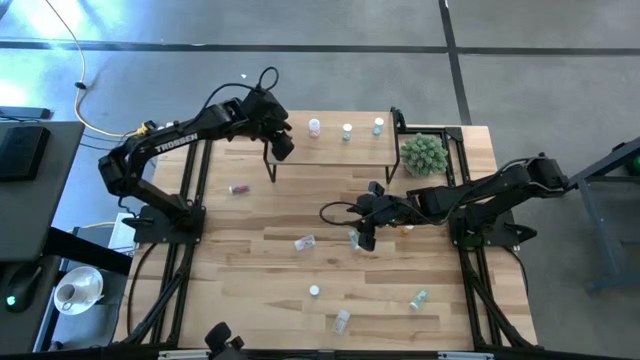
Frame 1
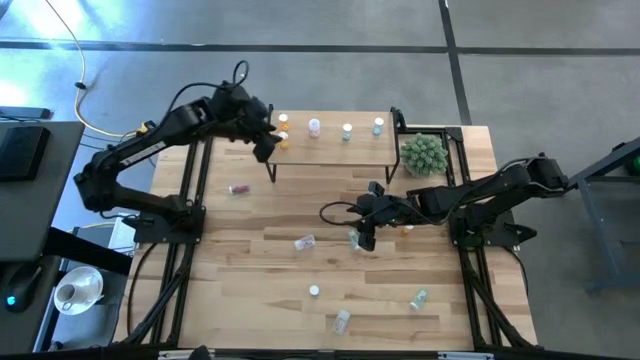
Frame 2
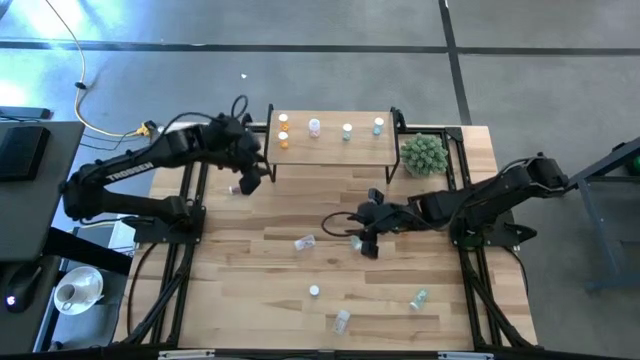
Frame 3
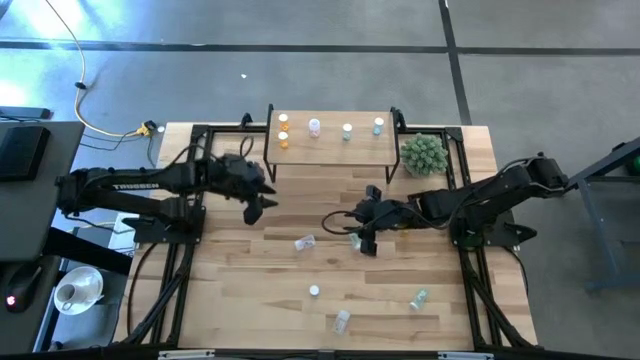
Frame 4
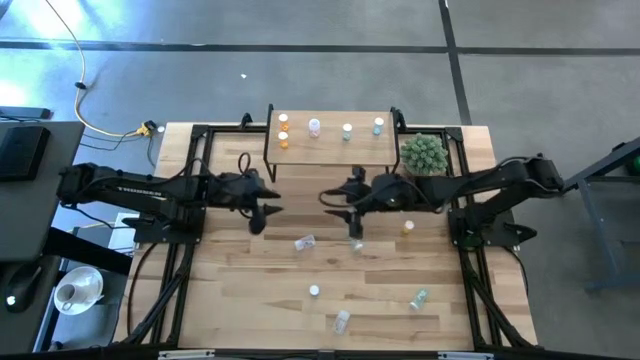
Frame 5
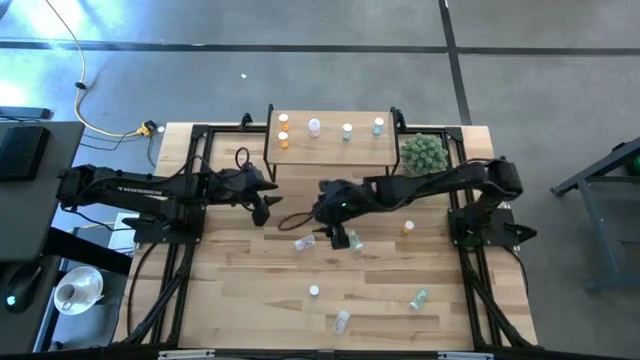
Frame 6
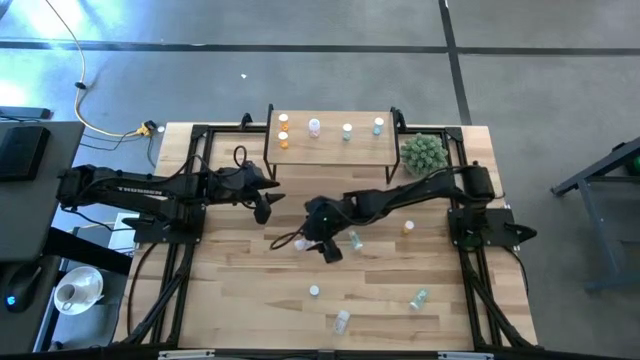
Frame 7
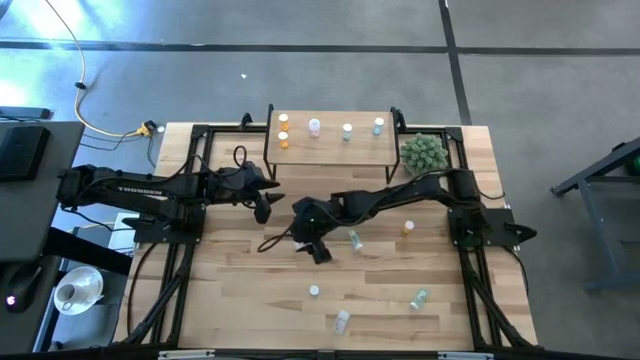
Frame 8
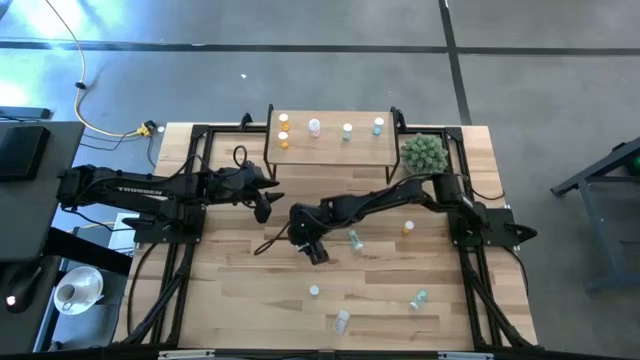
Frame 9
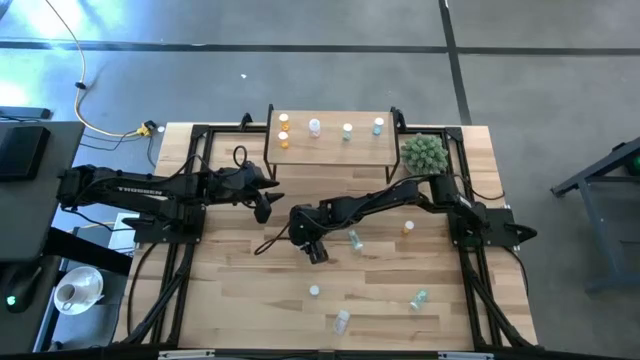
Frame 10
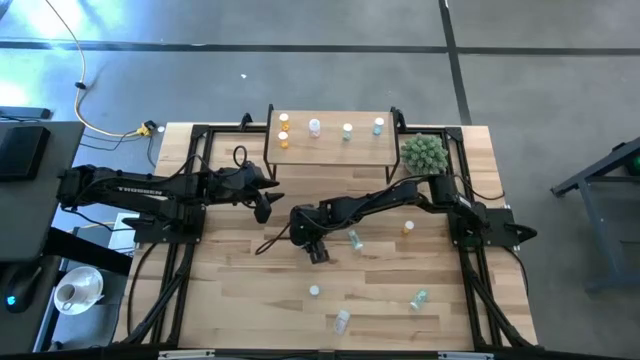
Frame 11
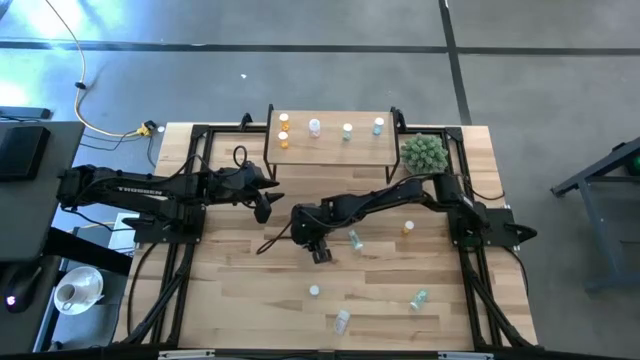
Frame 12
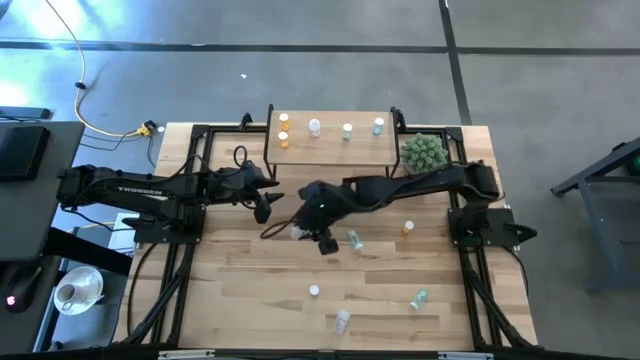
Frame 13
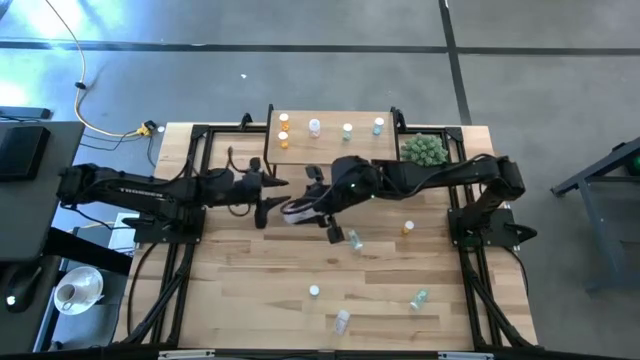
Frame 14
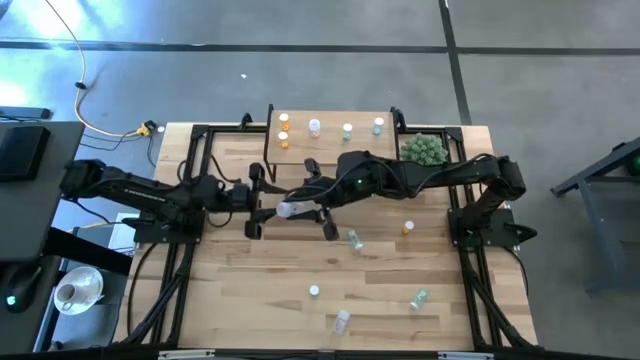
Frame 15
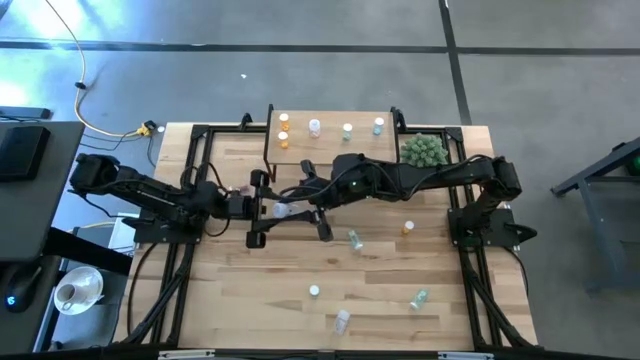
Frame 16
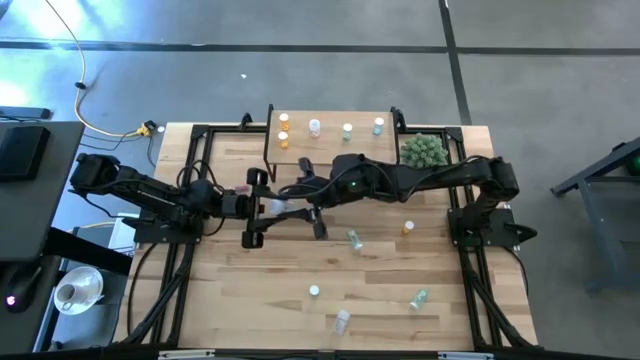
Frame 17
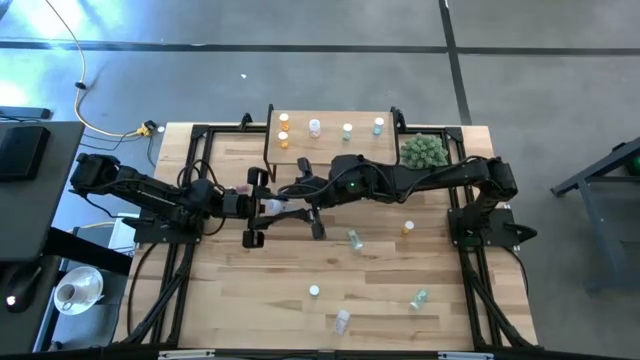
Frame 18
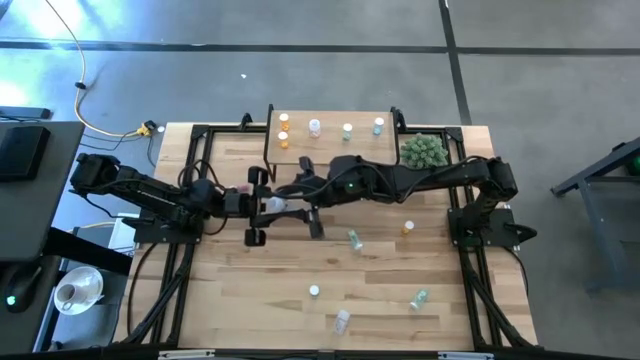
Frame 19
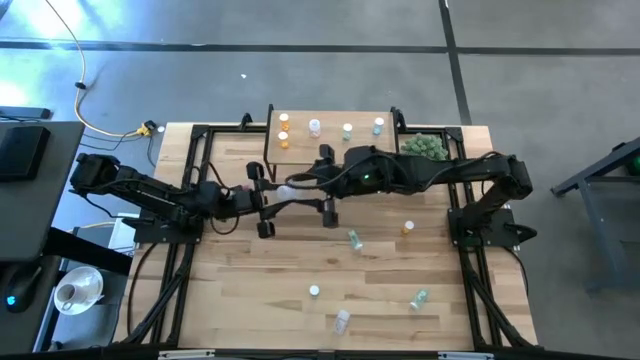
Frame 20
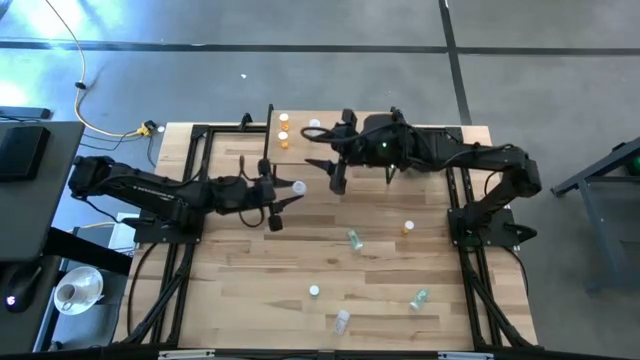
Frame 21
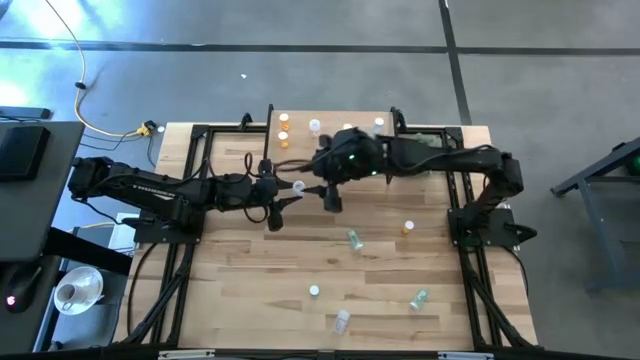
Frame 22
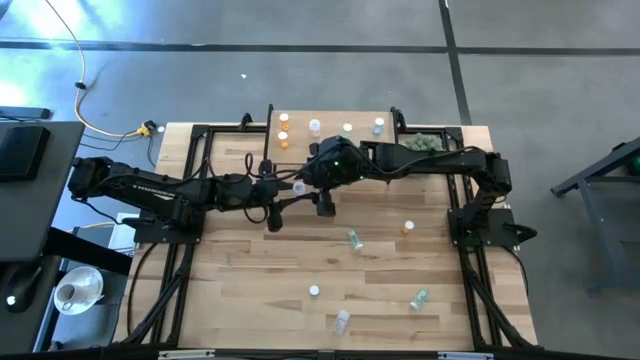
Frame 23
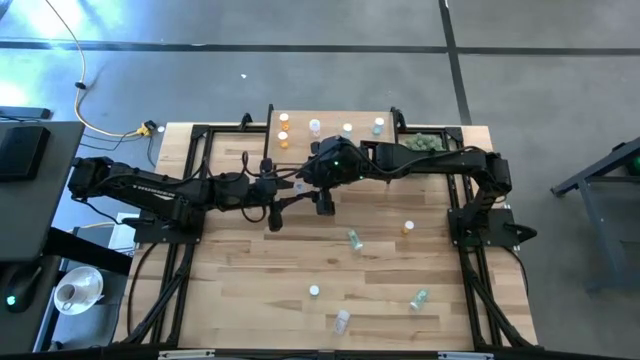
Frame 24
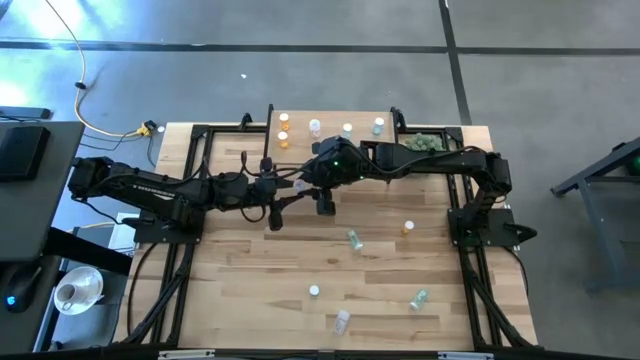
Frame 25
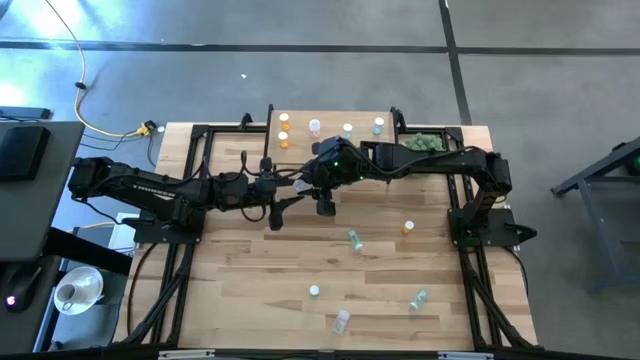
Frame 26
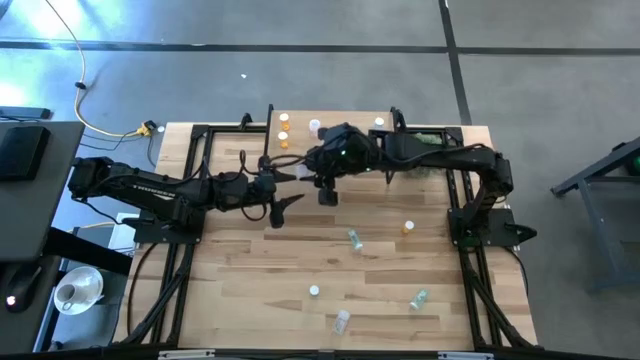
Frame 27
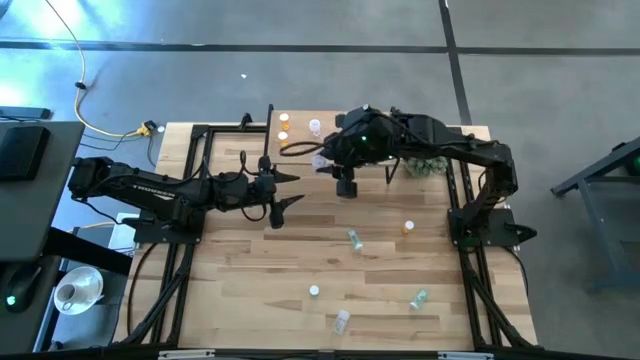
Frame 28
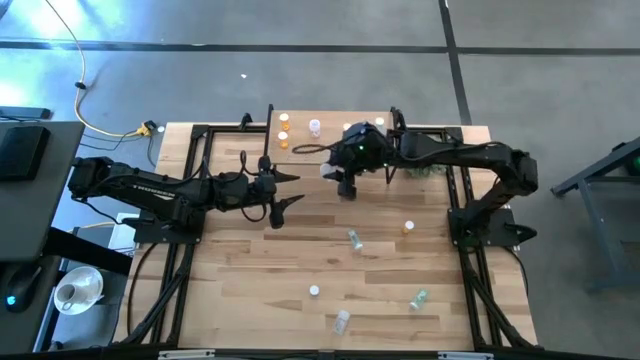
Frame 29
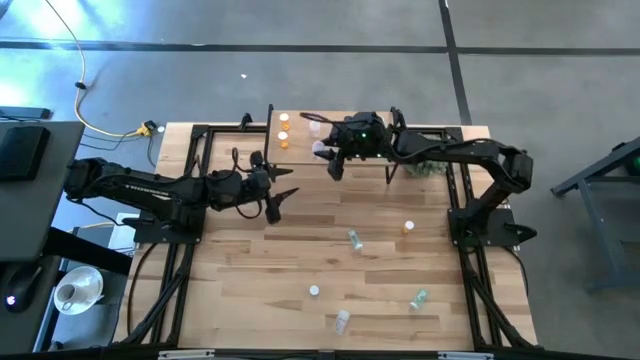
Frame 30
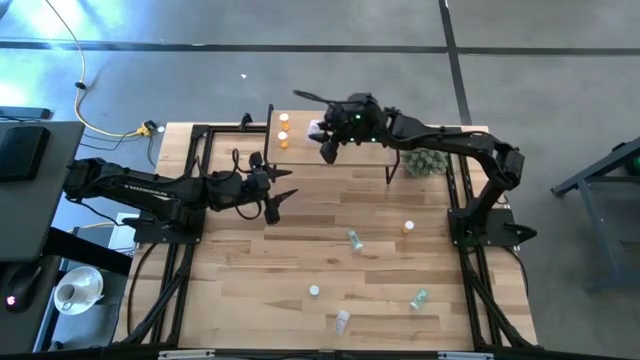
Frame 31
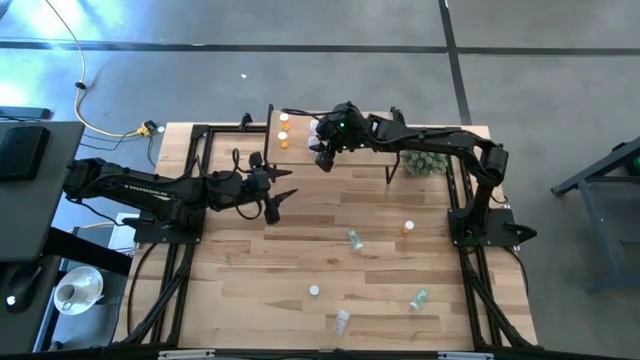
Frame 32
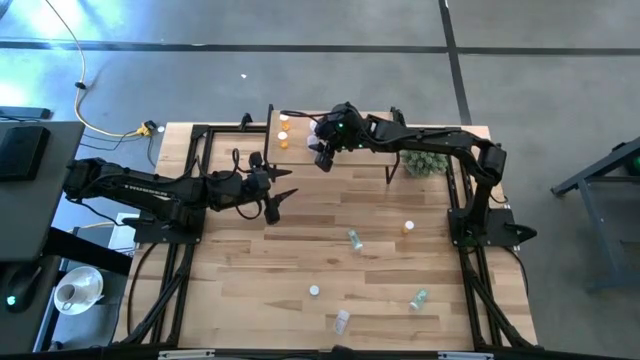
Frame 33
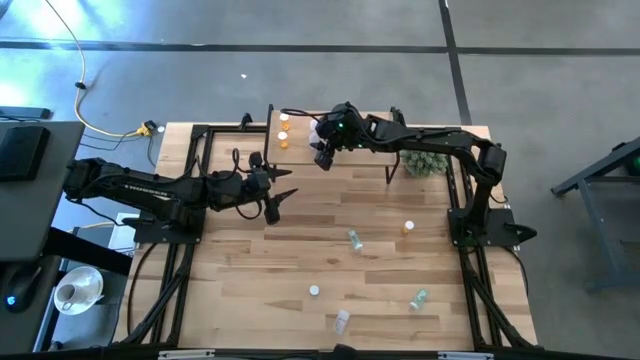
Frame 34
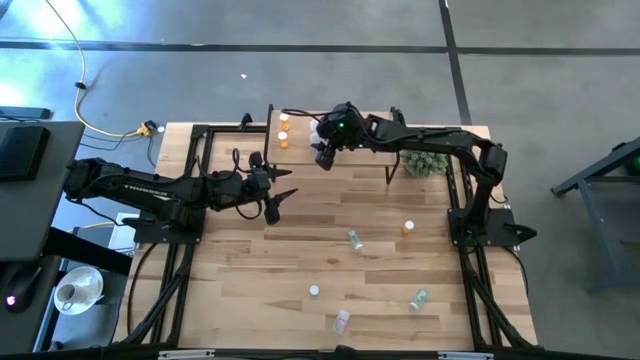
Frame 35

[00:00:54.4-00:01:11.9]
Task: Pick and place medicine bottles onto shelf by color
Put the top transparent pill bottle on the shelf and aligned with the other transparent pill bottle

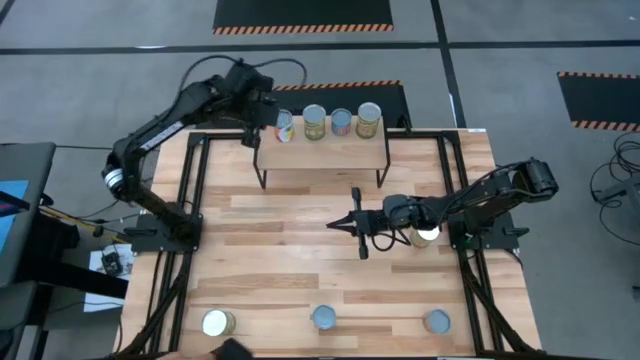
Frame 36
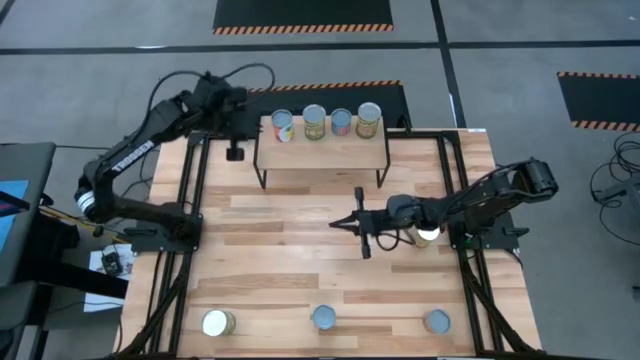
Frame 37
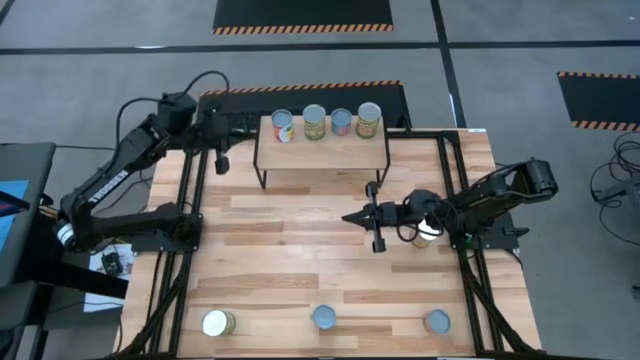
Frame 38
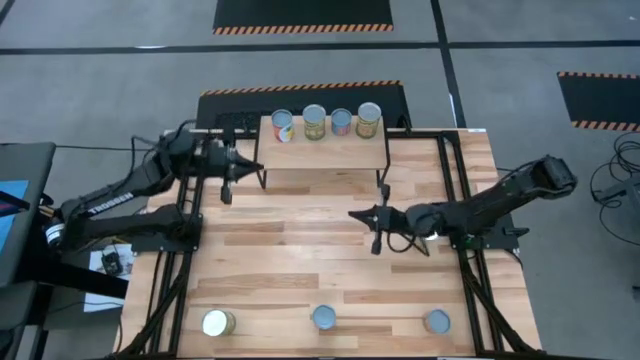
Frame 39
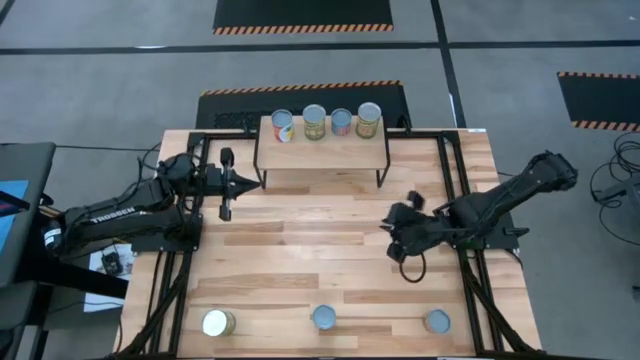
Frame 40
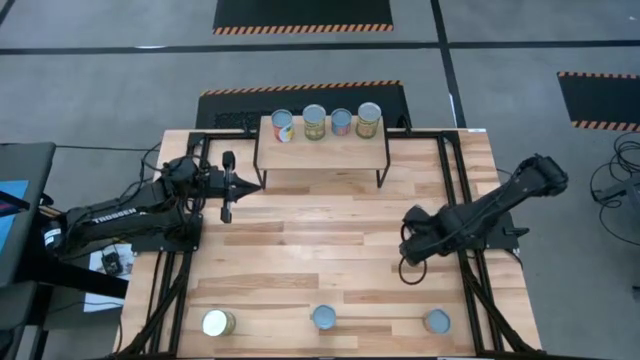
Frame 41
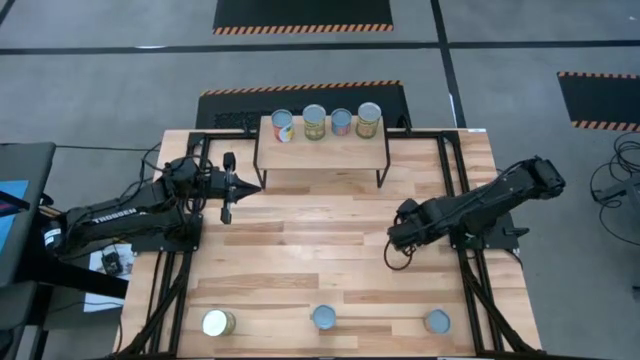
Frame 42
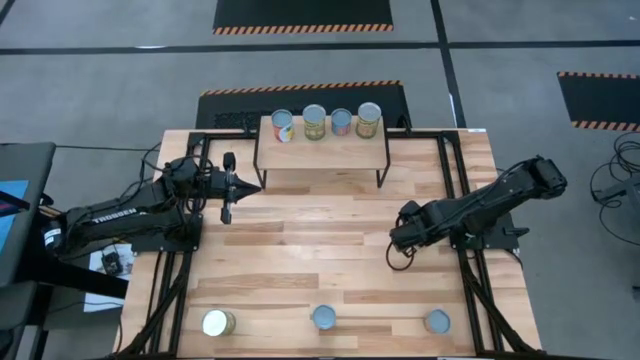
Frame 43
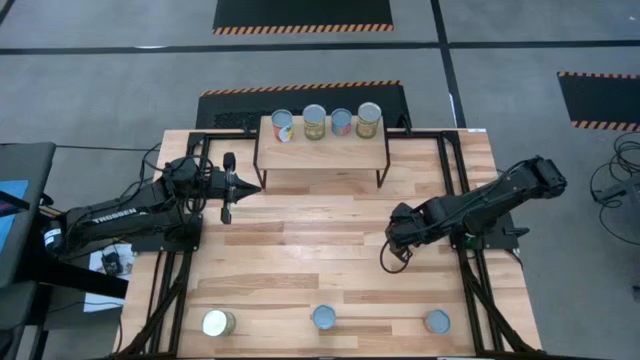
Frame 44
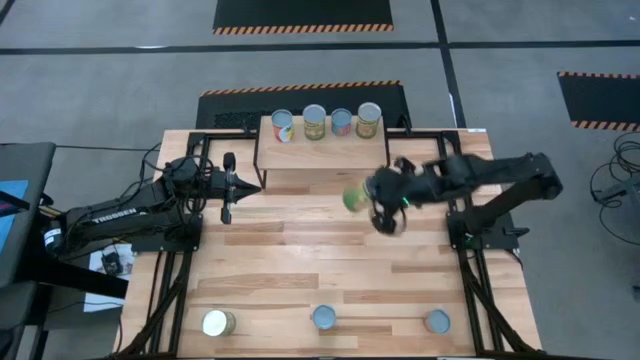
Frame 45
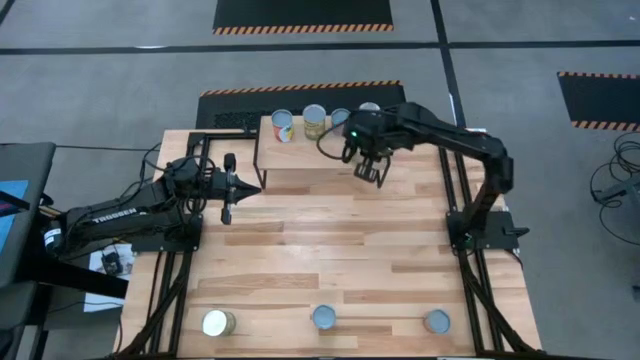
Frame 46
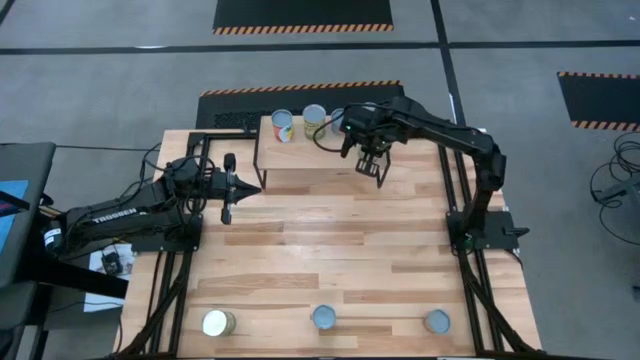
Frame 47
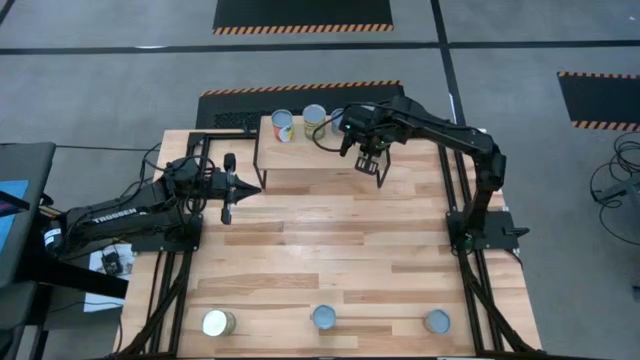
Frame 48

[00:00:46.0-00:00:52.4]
Task: Pick and place cans onto a shelf
Put the middle right large dark green can on the shelf and align it with the green can
